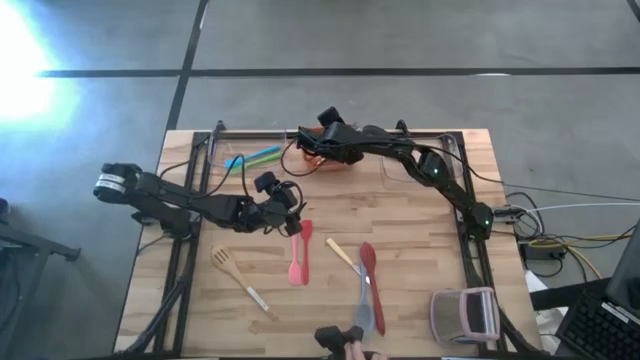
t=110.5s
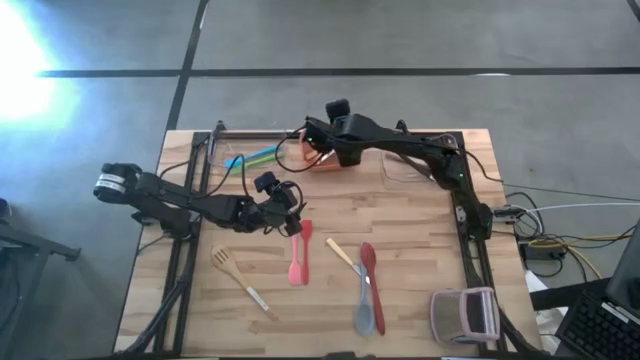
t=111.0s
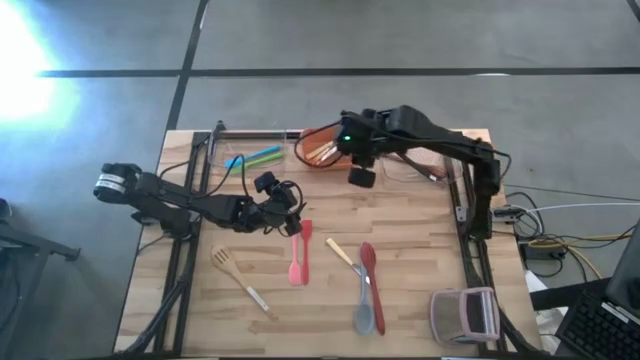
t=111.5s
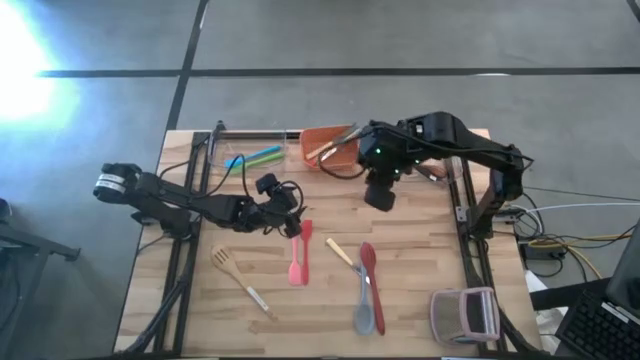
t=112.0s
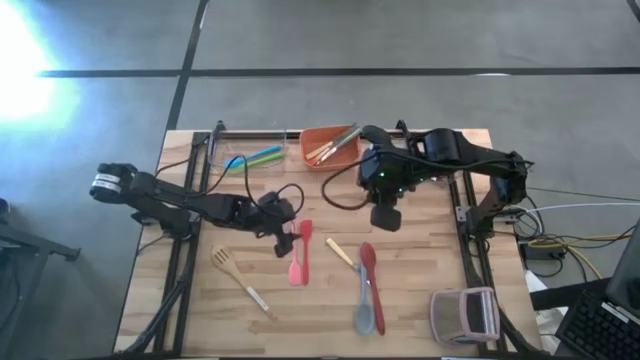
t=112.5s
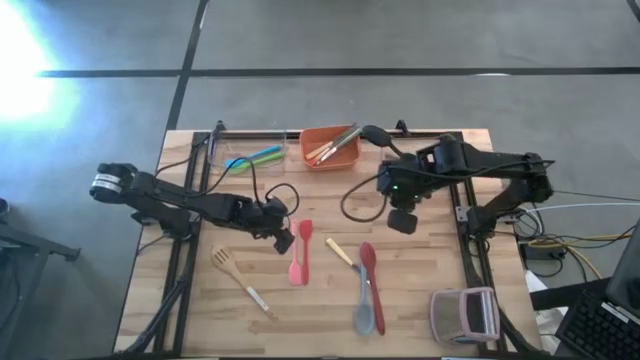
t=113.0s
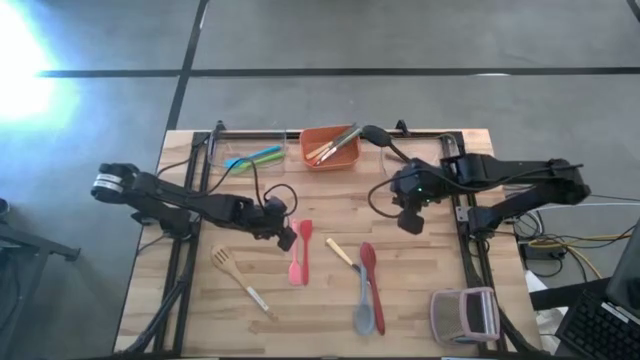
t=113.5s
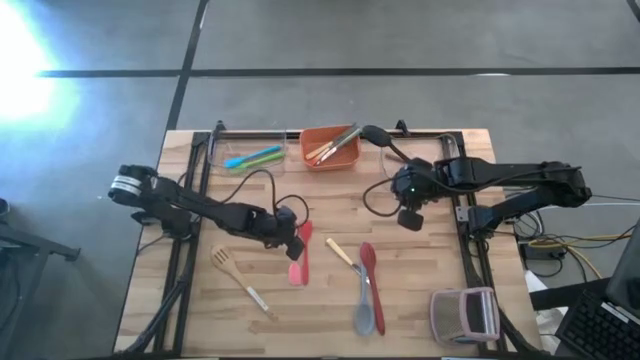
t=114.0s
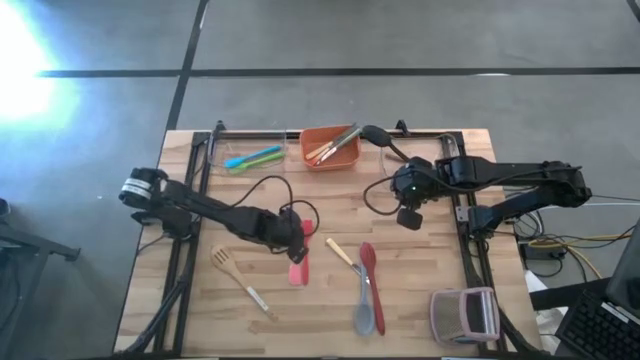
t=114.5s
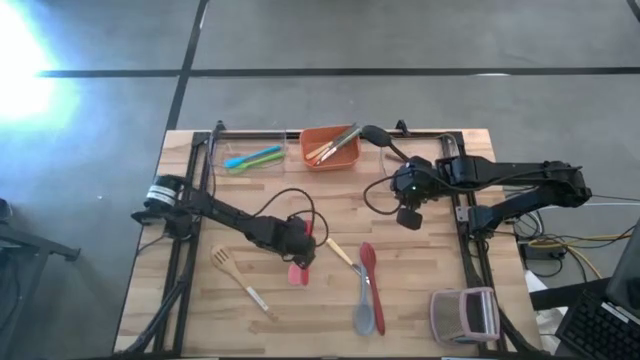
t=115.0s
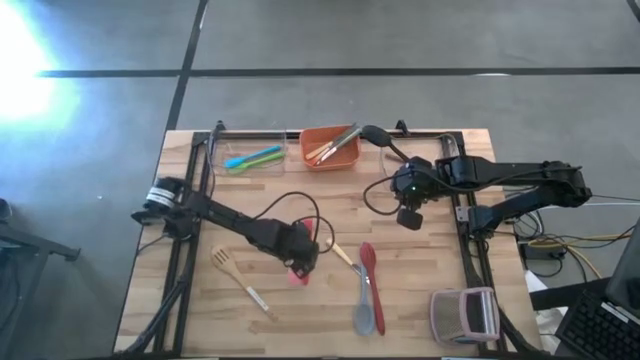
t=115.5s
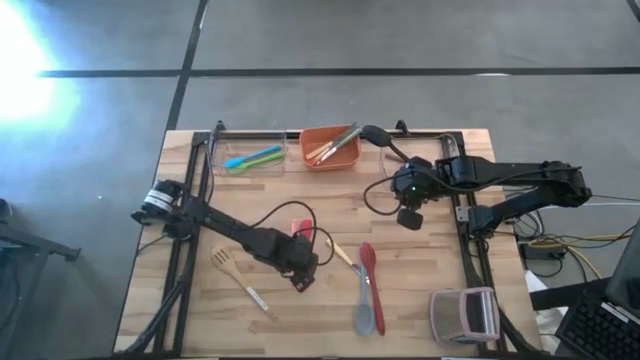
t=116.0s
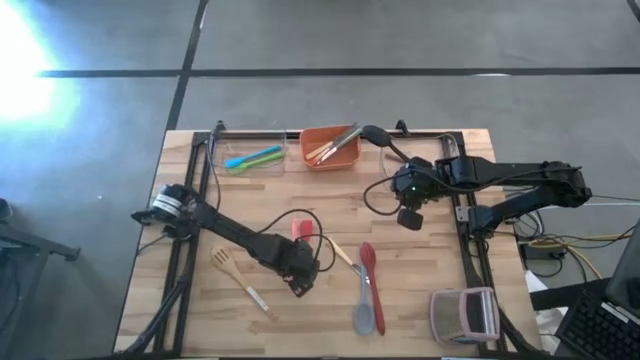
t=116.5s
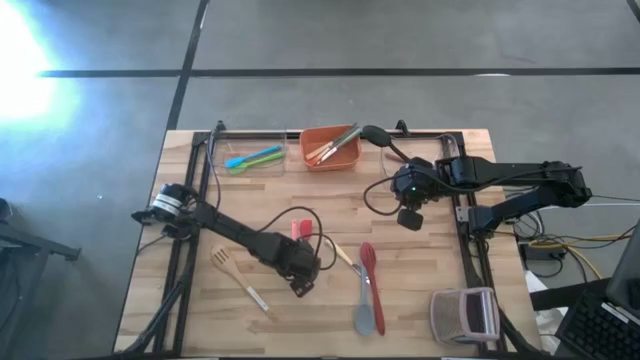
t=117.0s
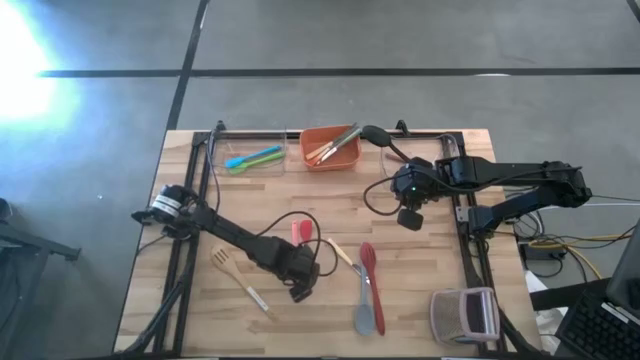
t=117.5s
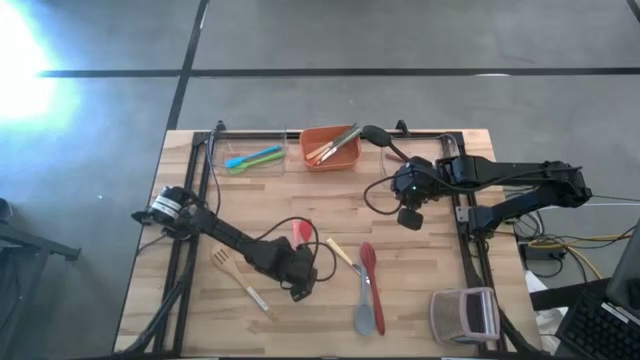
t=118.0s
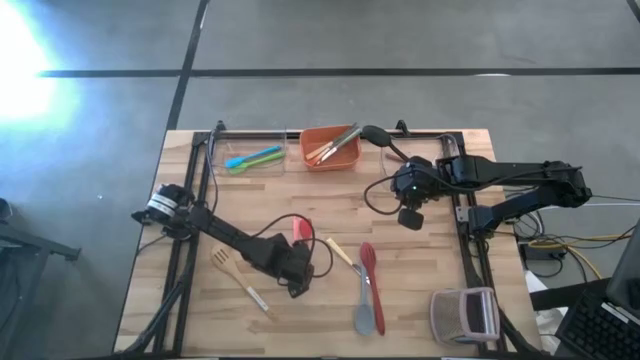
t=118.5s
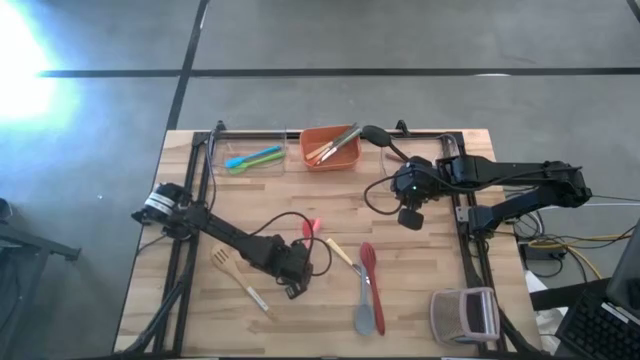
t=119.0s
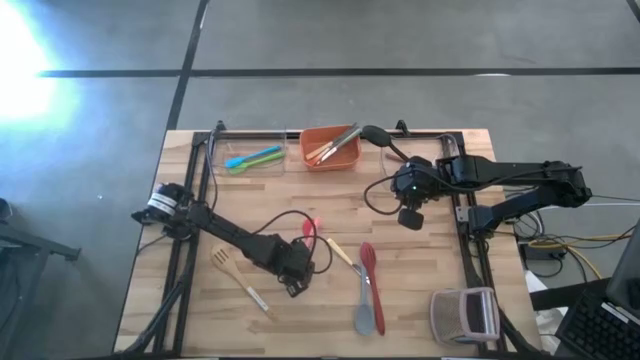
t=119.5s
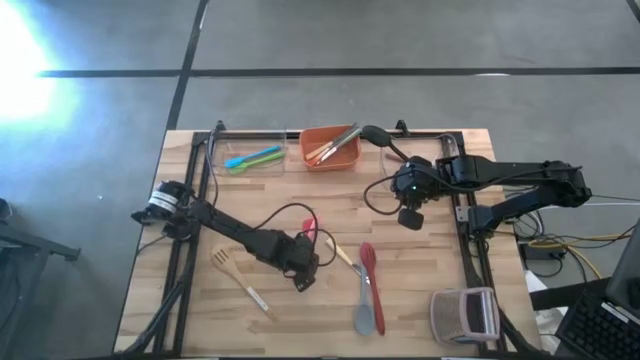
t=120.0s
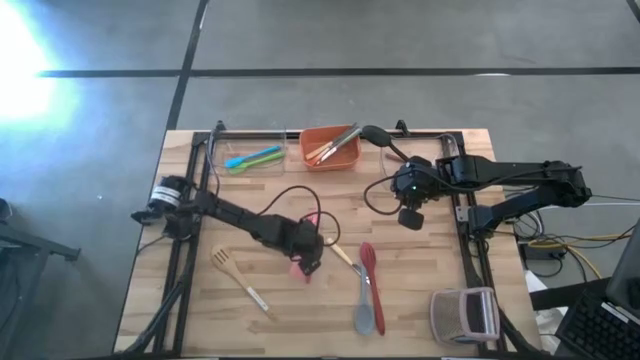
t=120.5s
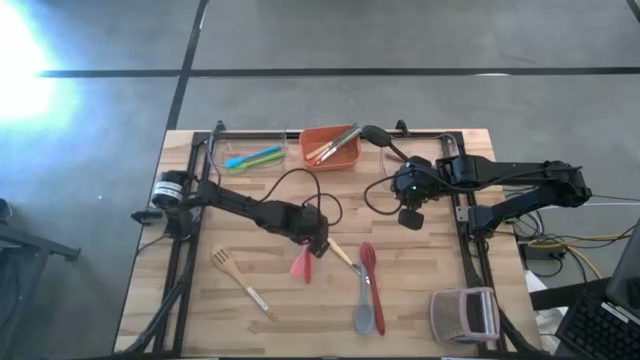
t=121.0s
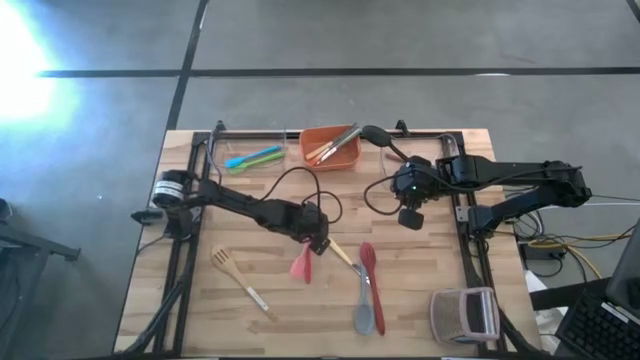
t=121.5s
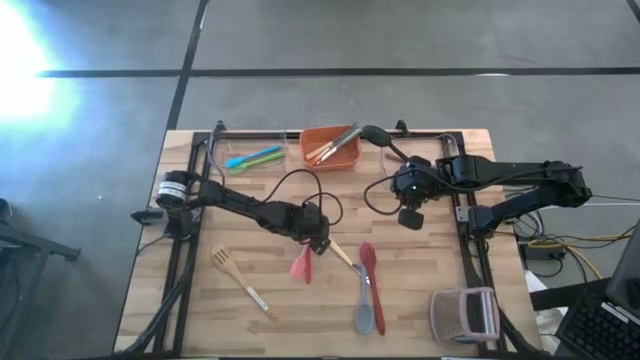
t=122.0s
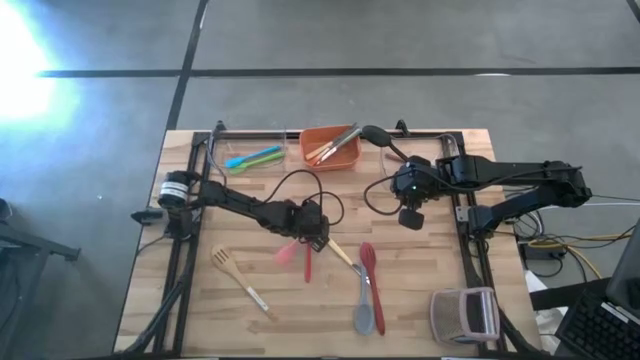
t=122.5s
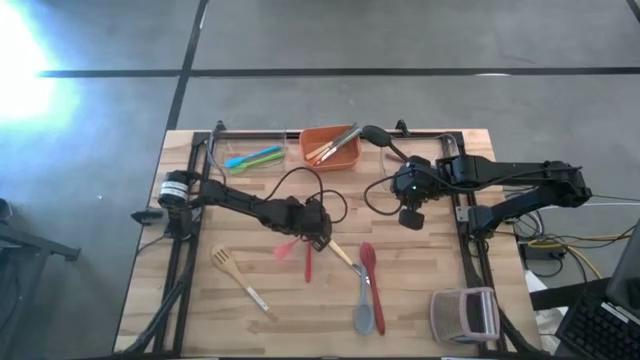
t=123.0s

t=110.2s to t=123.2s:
Task: Pick & Place Kitchen Items
Put the pink spatula into the left transparent bin

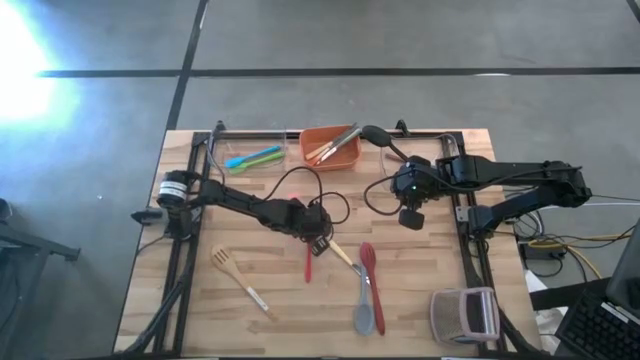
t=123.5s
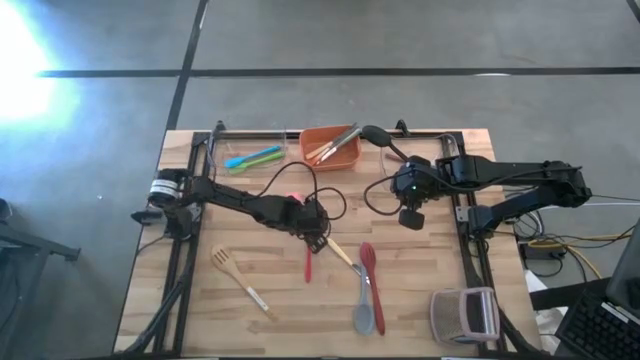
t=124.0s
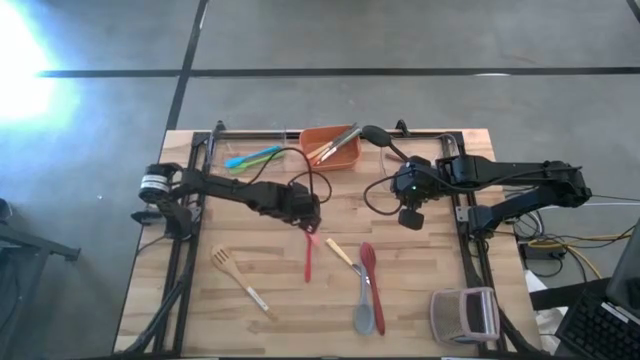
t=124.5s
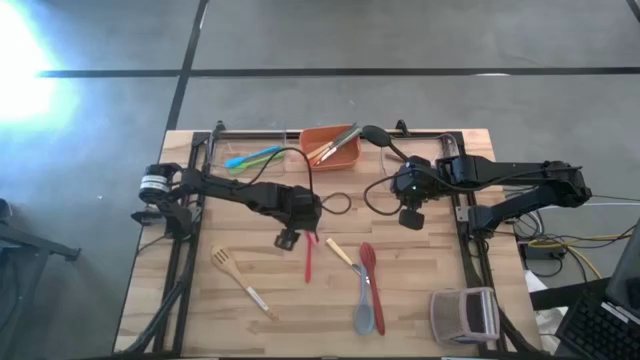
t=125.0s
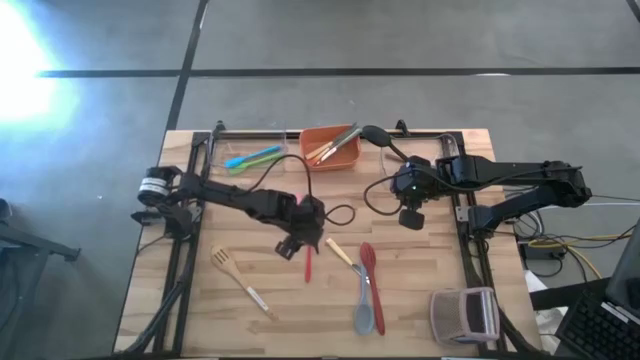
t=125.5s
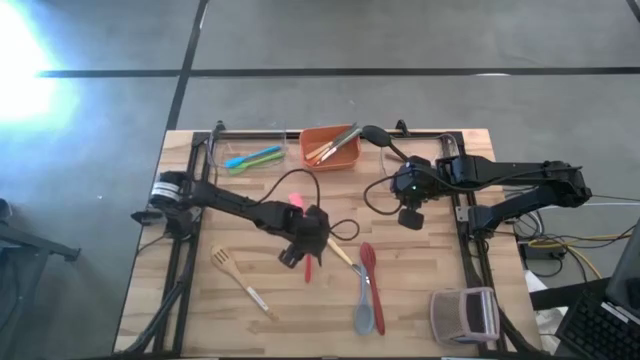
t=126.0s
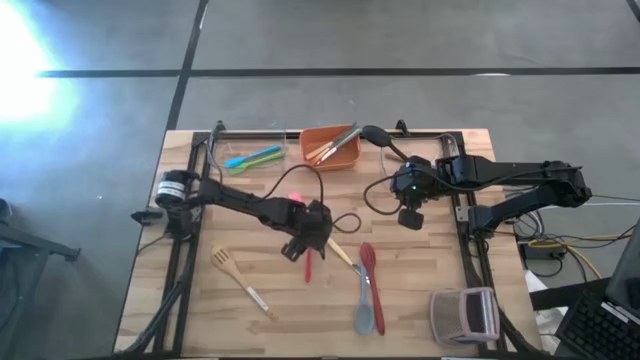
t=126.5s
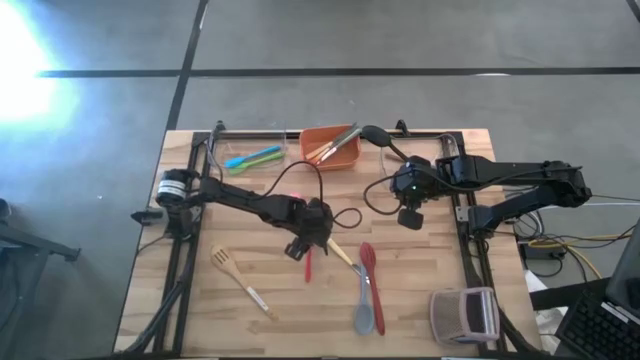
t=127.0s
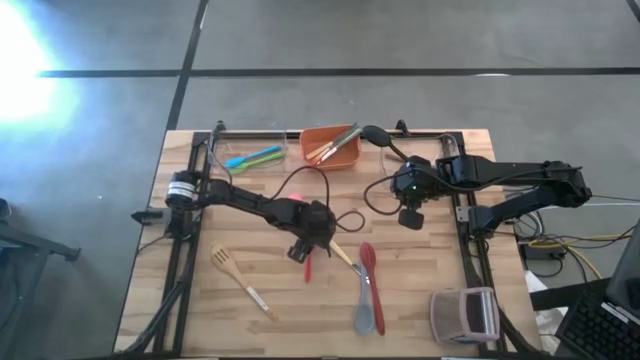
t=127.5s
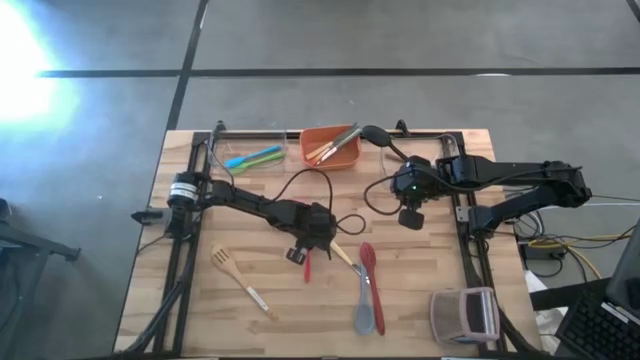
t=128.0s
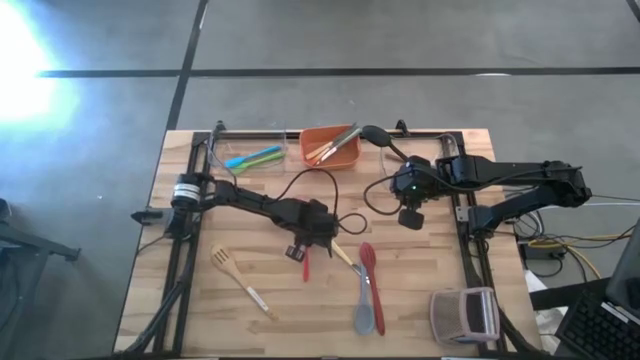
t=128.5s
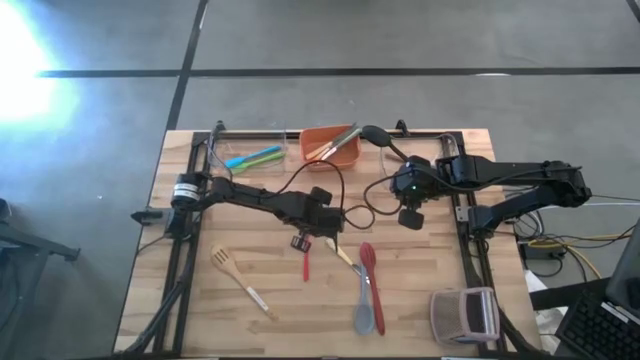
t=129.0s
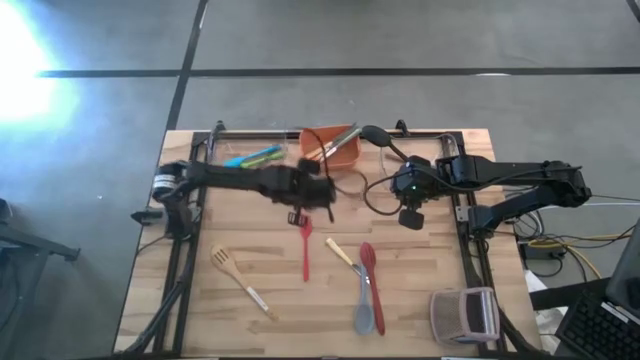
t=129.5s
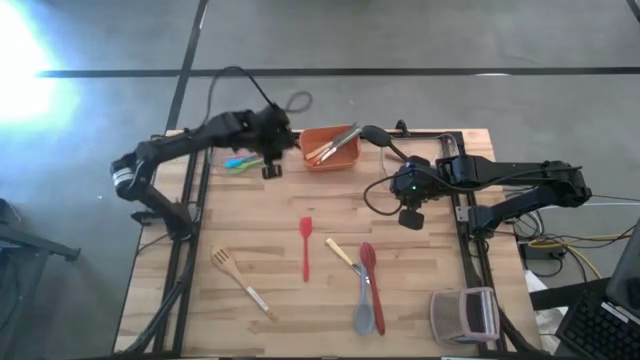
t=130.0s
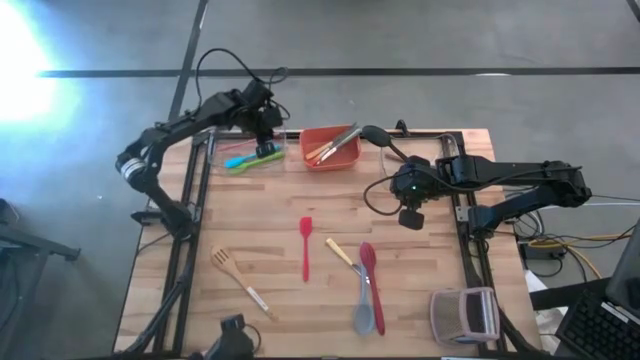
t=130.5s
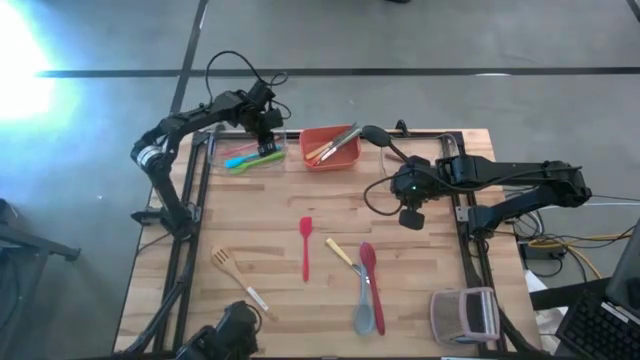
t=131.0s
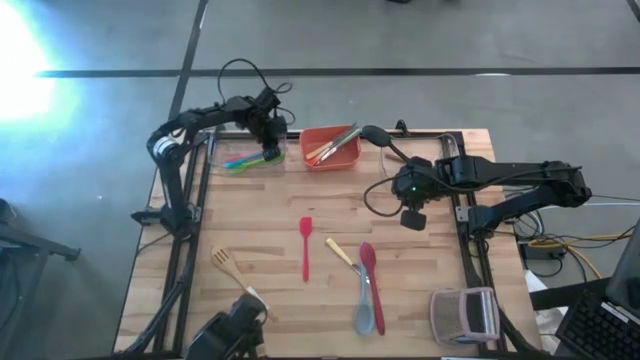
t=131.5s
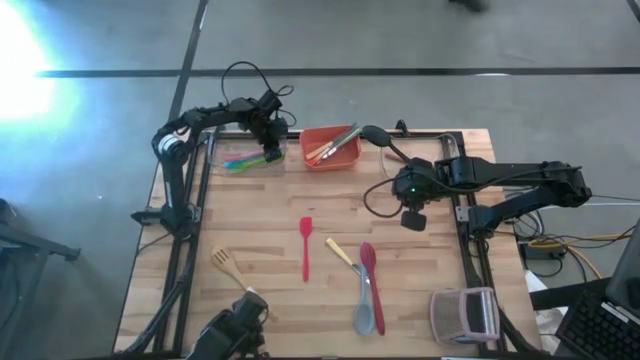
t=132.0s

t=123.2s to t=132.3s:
Put the pink spatula into the left transparent bin

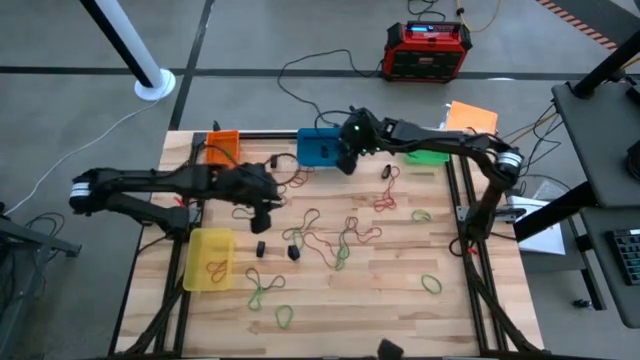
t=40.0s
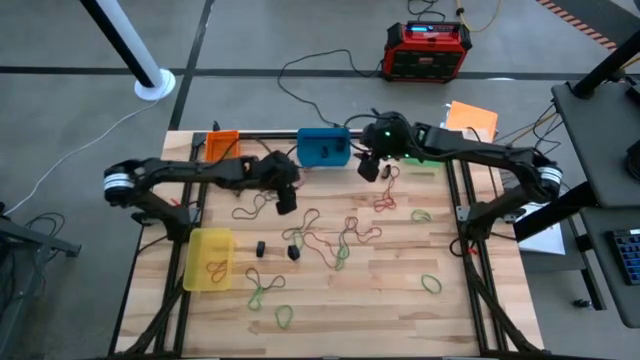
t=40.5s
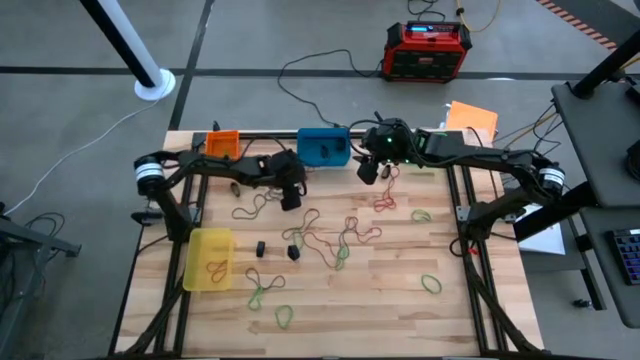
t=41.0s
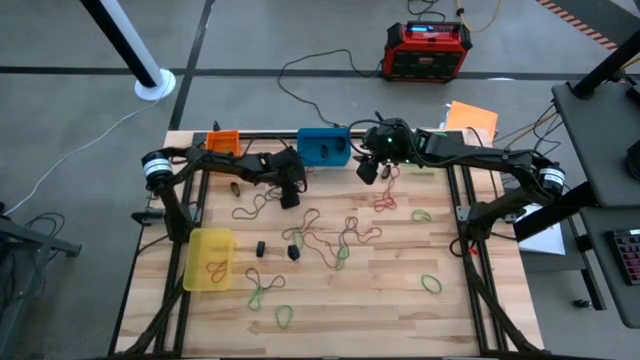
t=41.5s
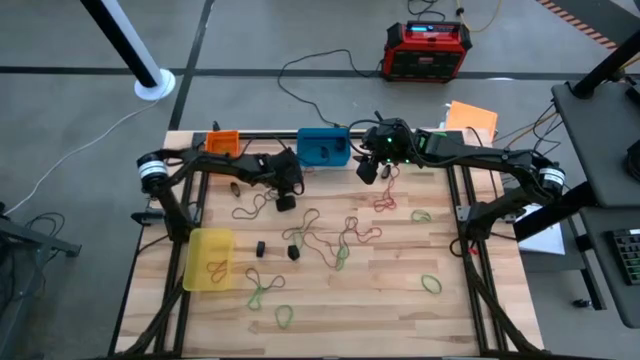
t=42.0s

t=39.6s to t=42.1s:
Task: Sort rubber bands into baskets
Put the red rubber band into the yellow bin
